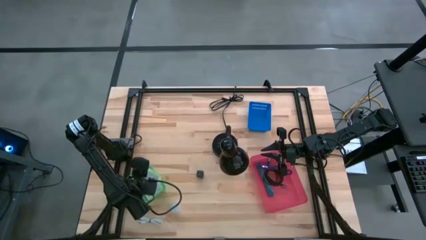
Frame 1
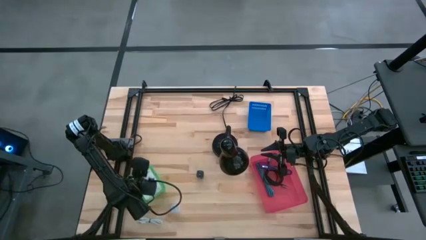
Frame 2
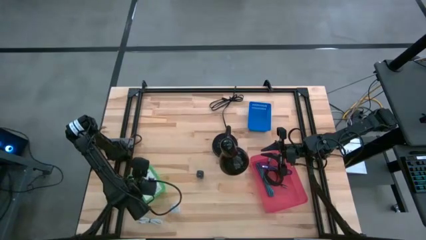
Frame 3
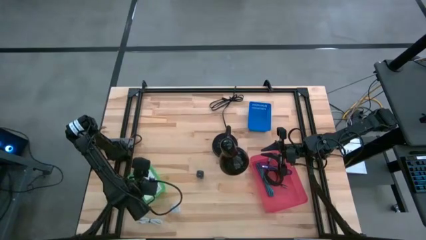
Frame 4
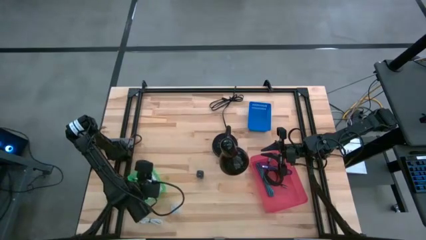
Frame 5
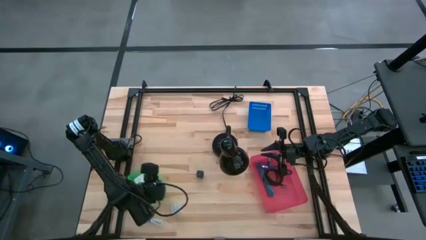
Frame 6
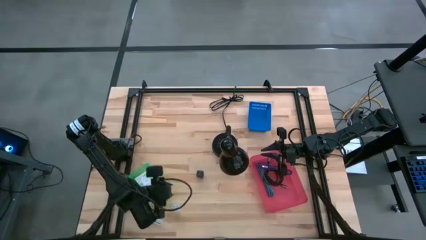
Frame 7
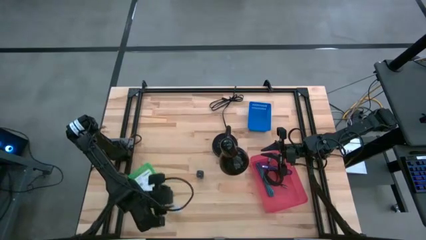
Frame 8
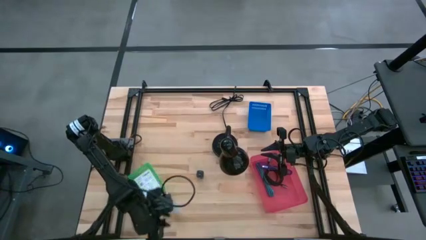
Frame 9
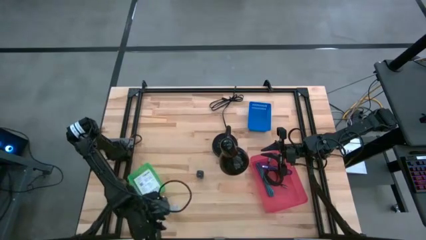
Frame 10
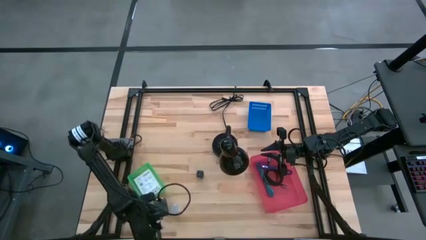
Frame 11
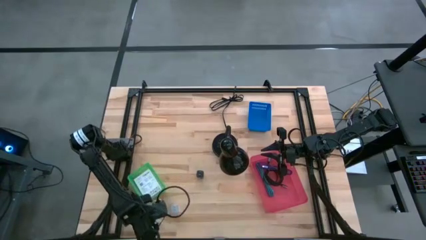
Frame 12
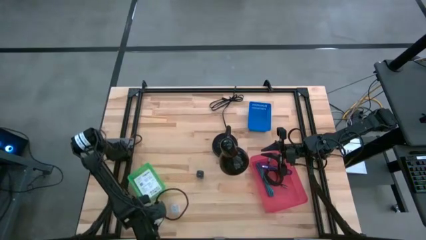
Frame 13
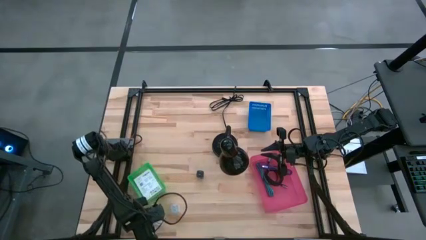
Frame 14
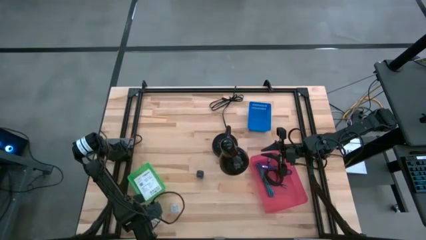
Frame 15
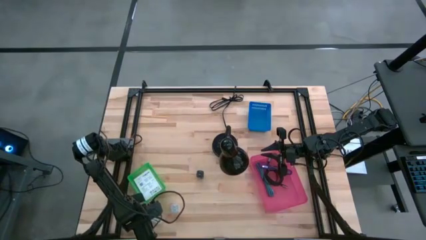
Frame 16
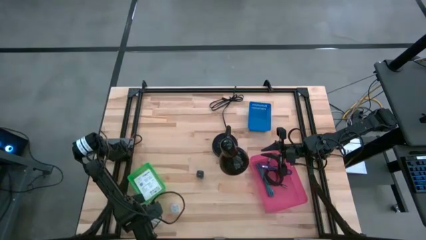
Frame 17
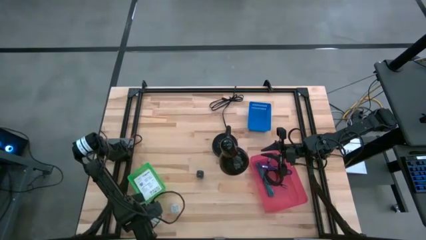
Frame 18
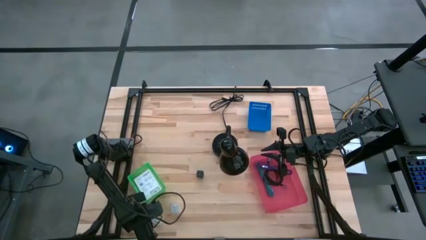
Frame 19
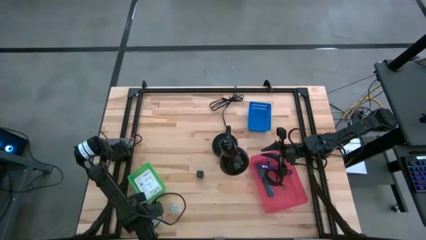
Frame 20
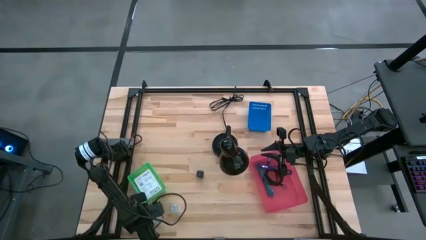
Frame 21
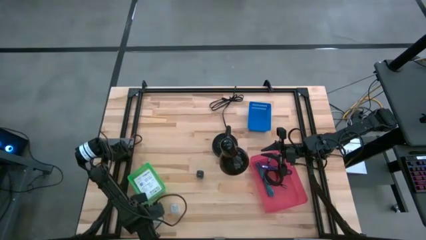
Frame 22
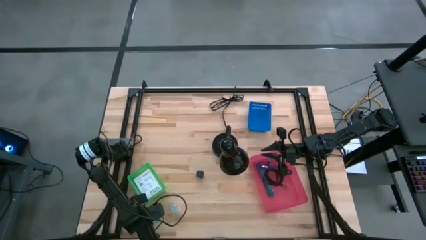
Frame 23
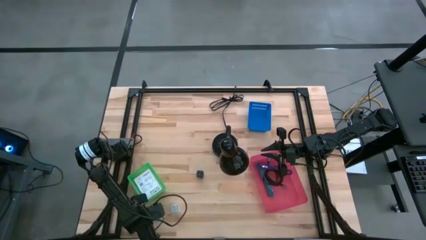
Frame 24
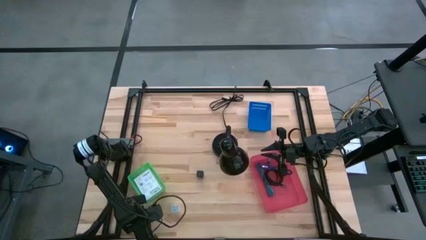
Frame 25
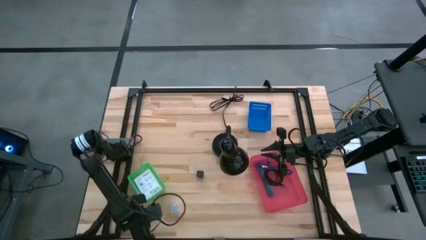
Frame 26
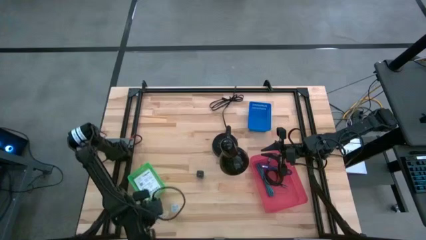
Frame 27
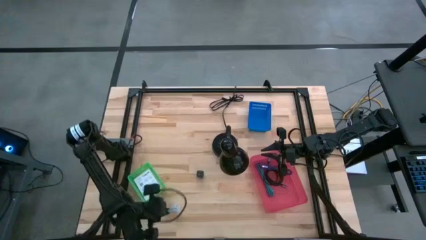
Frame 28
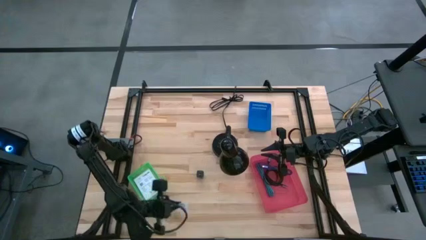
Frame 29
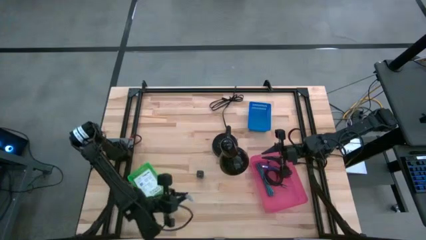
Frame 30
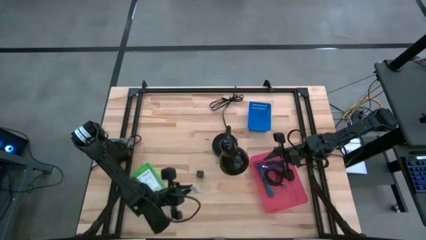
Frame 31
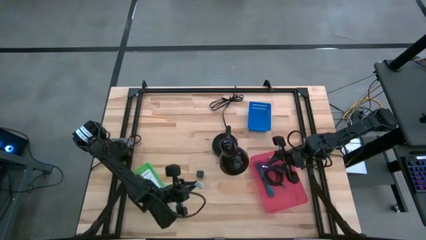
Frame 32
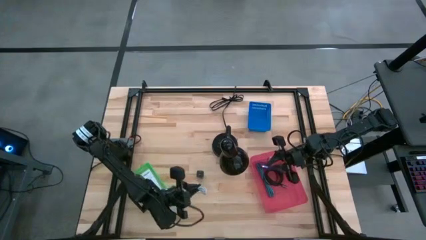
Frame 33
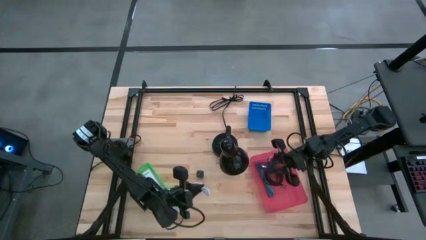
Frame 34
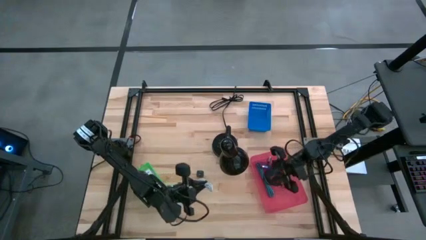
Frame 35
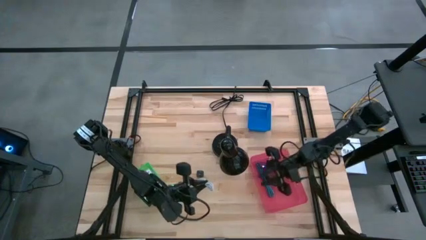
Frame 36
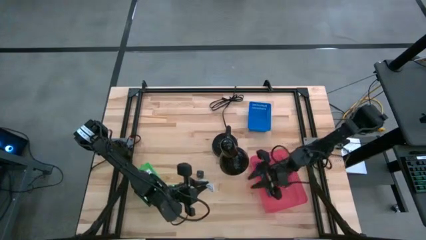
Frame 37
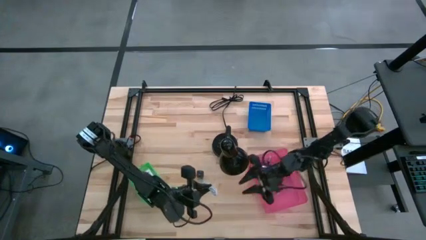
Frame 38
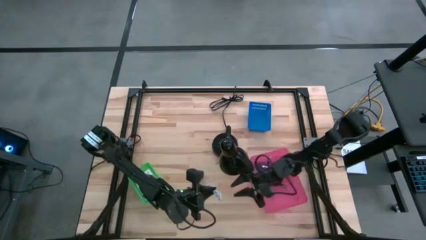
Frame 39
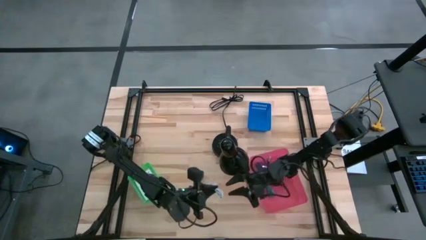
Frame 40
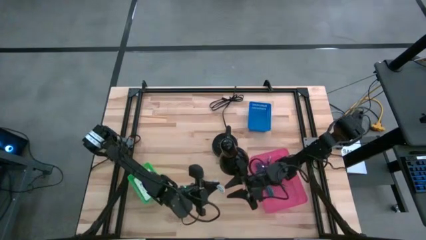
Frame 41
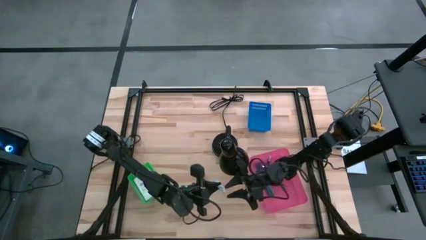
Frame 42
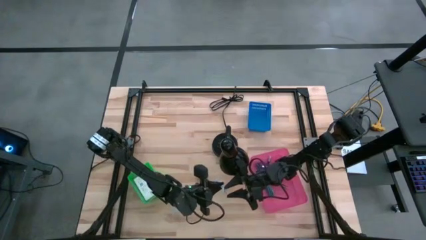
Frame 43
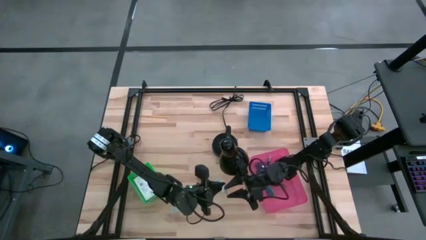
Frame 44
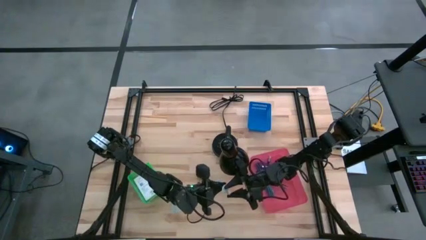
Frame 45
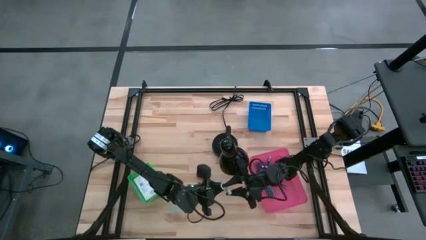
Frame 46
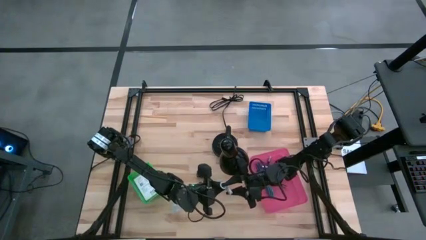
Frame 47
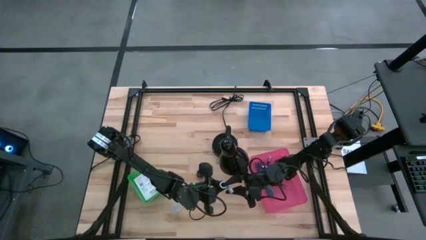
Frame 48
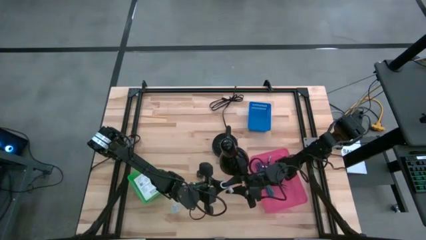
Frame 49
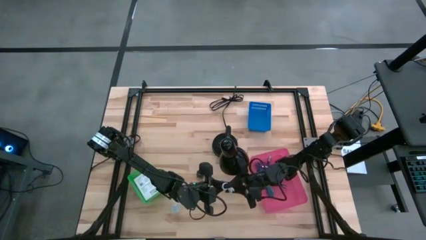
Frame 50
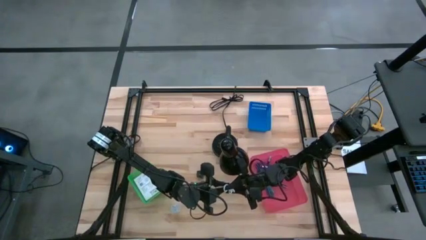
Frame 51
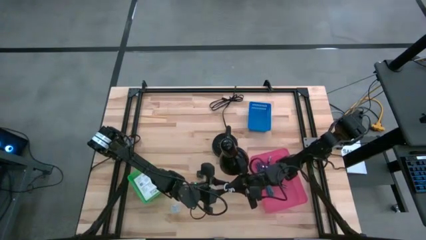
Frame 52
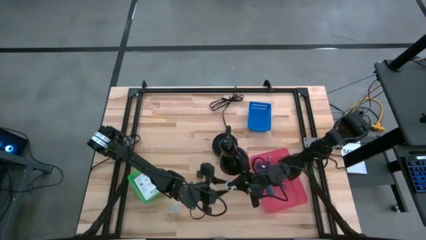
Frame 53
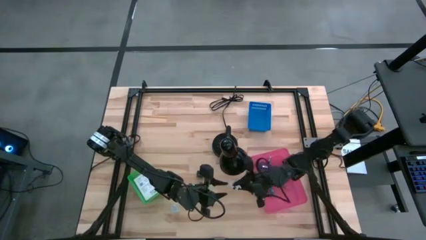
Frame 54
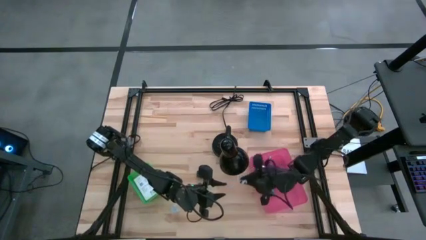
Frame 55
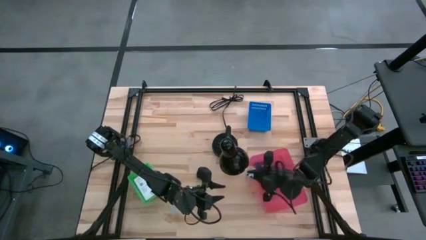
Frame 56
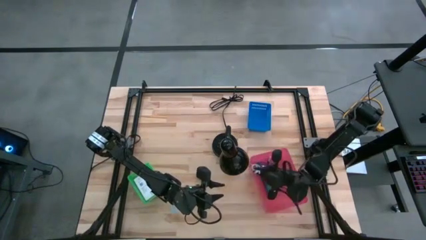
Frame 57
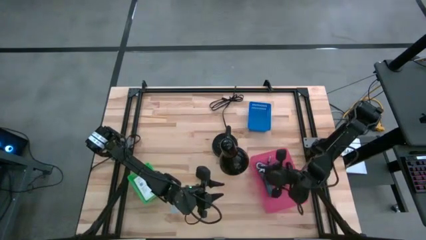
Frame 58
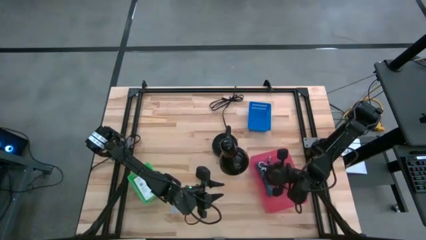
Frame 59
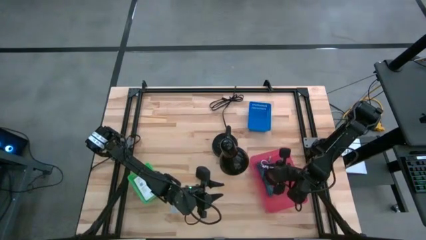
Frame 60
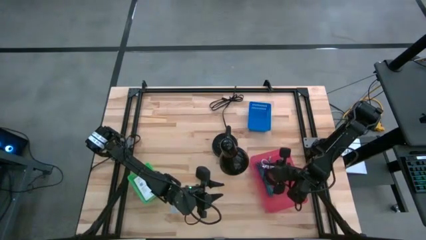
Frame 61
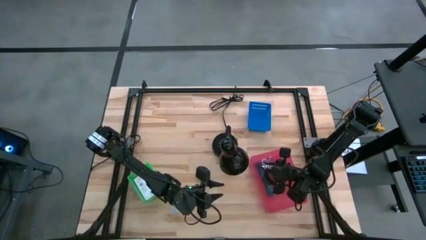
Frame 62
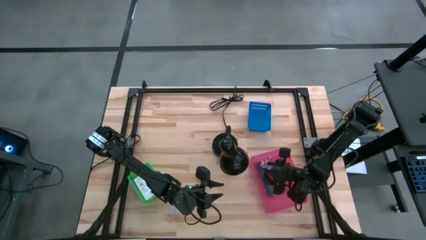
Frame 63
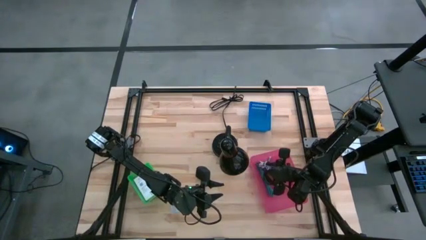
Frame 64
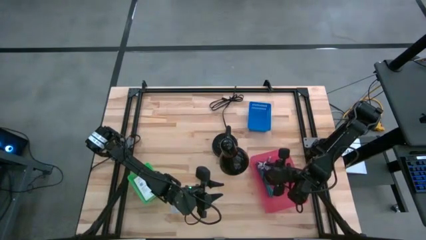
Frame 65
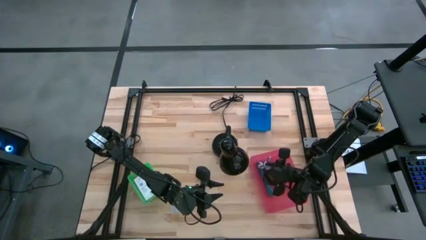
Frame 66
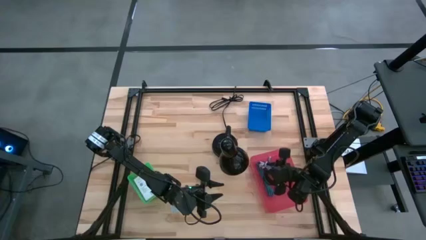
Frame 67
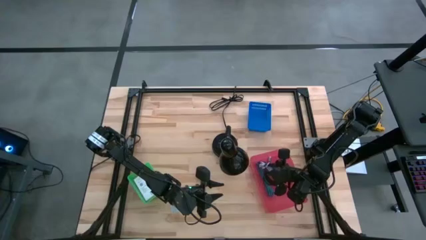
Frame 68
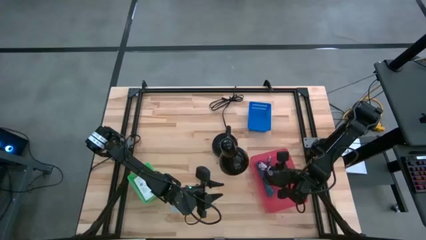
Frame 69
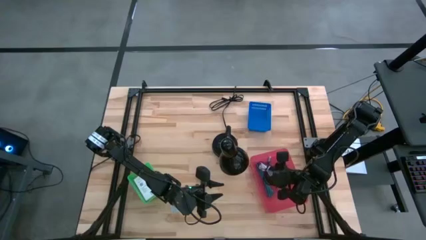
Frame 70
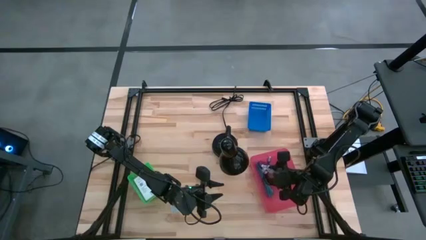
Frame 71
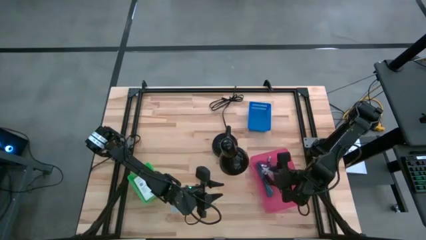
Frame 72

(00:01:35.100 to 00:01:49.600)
Task: Pick and place items into bin
Put the white charger cable into the red bin

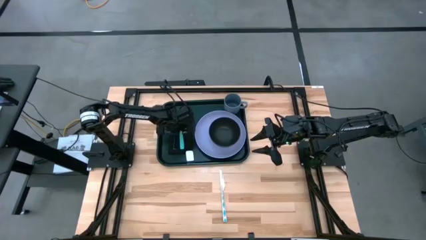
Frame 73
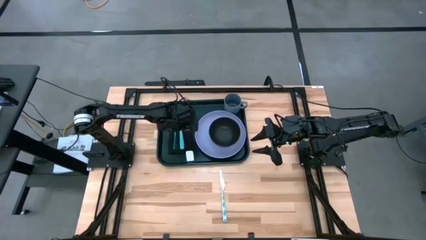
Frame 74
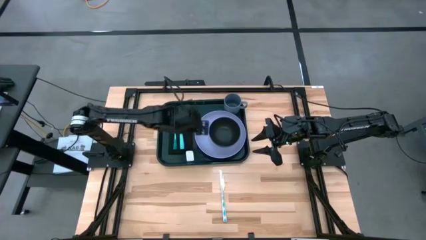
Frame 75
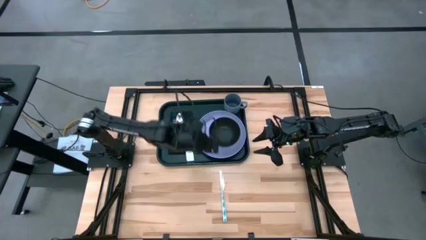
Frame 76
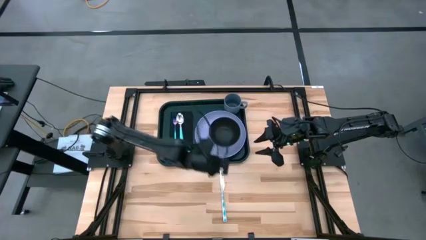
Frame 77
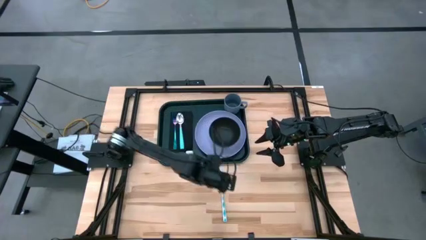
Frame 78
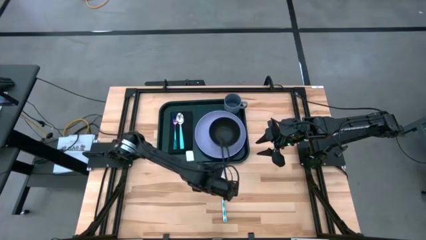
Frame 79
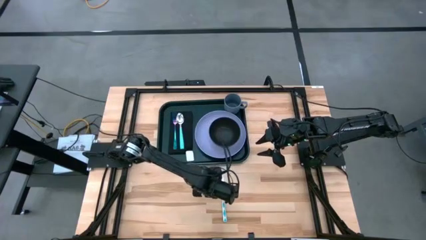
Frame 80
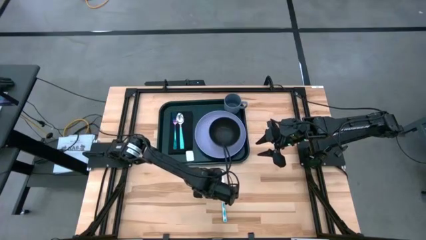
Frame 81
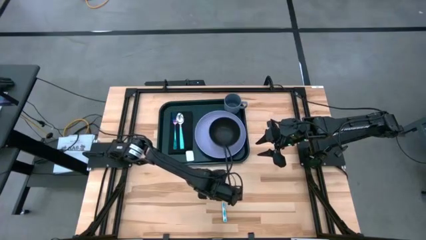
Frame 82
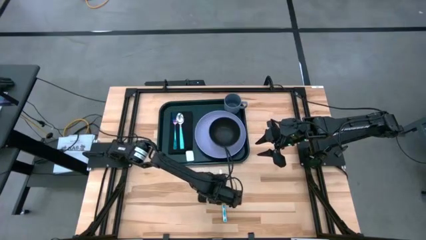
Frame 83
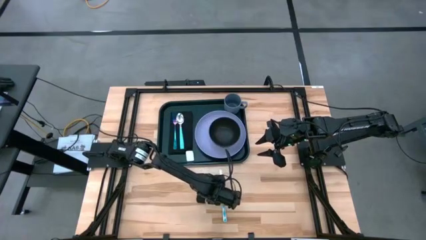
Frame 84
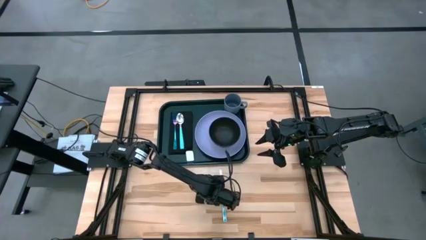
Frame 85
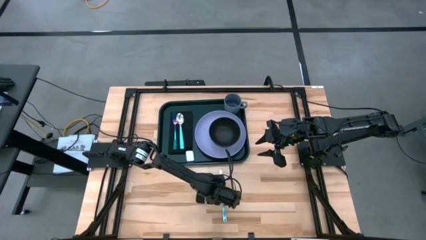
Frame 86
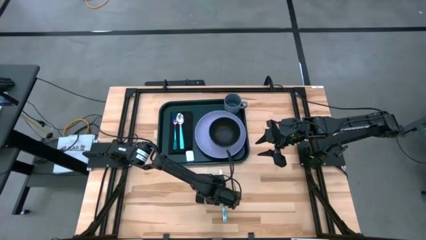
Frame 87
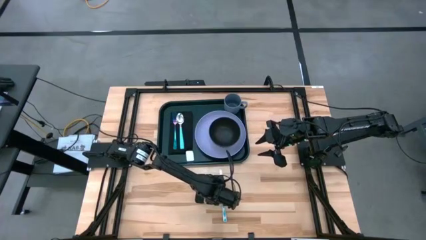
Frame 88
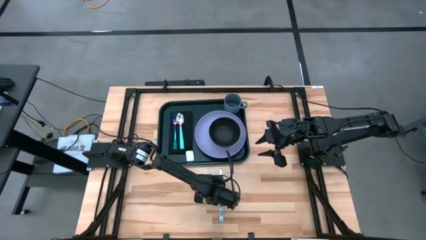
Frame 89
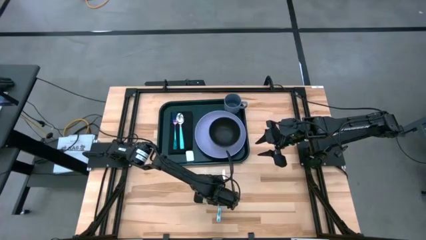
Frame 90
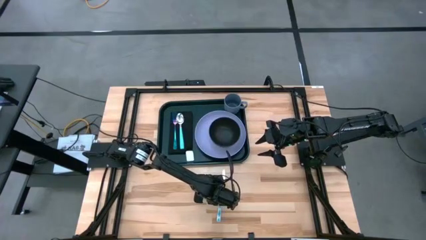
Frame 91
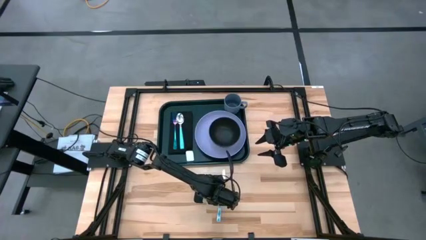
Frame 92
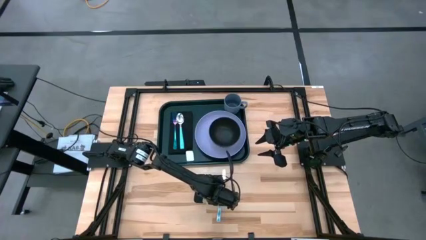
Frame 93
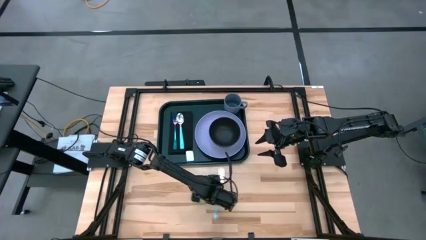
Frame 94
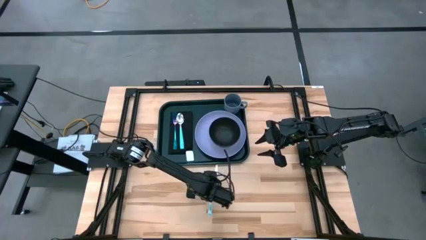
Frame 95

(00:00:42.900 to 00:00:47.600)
Task: Set up tray
Put the blue knife on the black napkin to the right of the blue spoon
